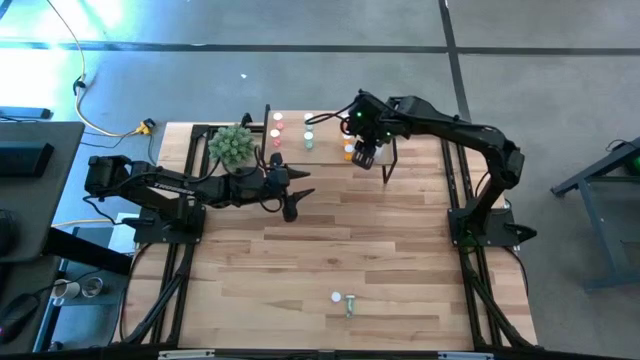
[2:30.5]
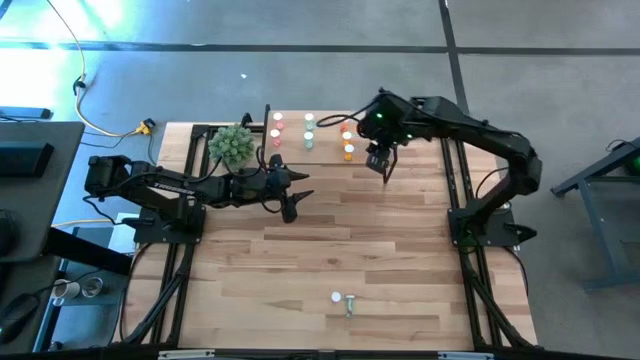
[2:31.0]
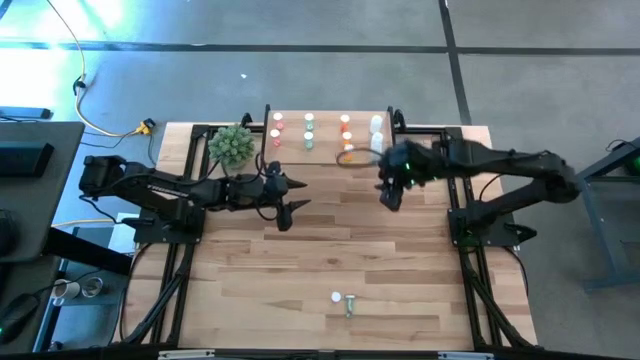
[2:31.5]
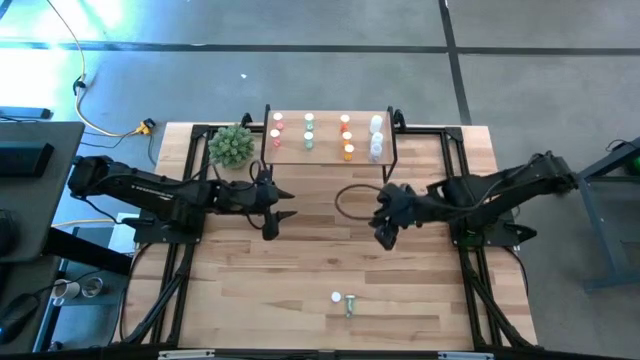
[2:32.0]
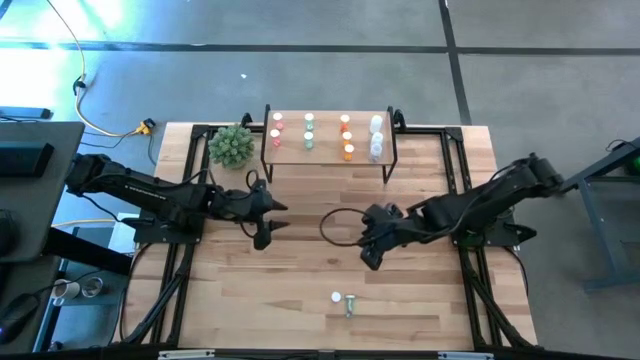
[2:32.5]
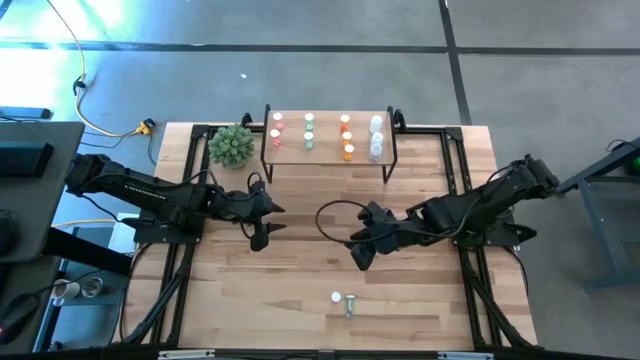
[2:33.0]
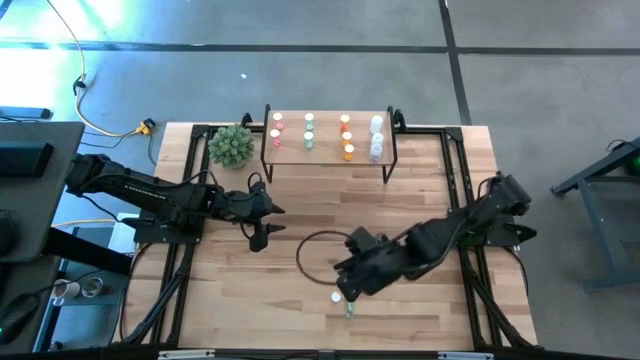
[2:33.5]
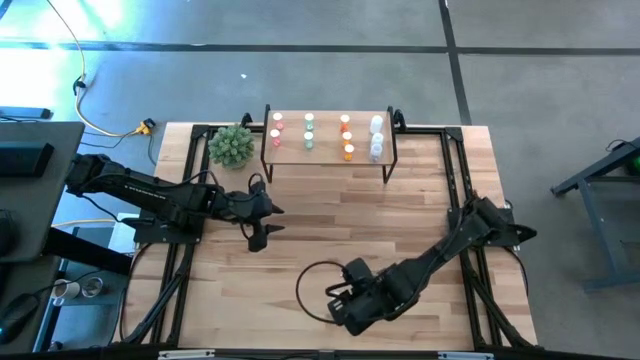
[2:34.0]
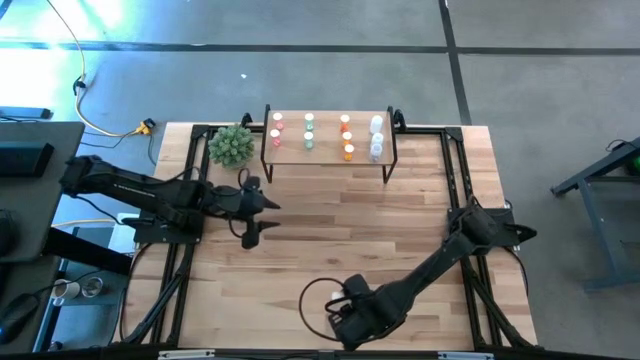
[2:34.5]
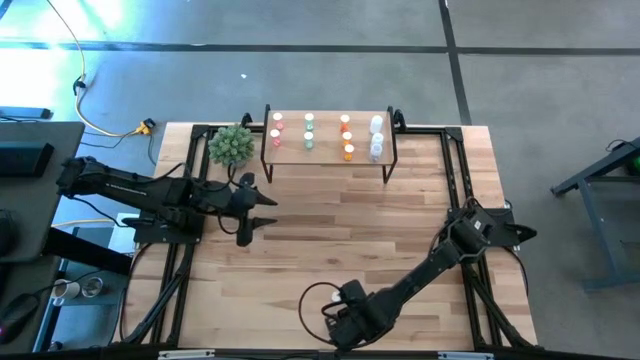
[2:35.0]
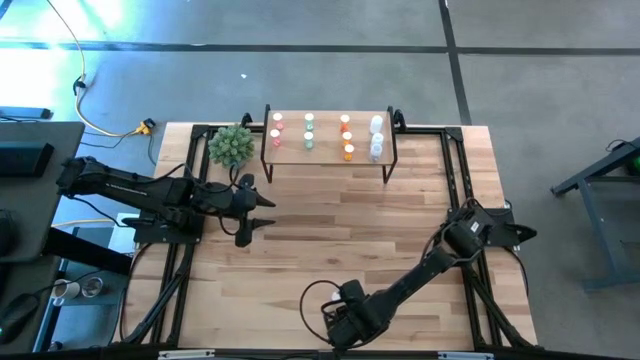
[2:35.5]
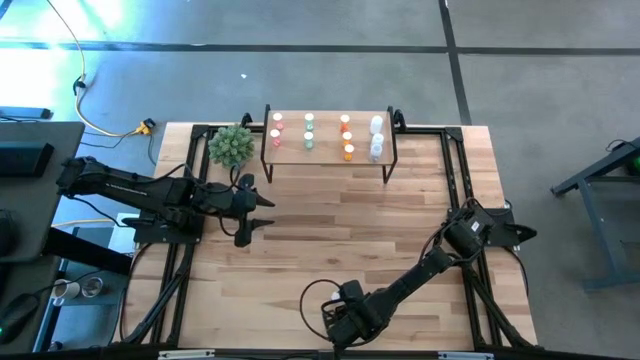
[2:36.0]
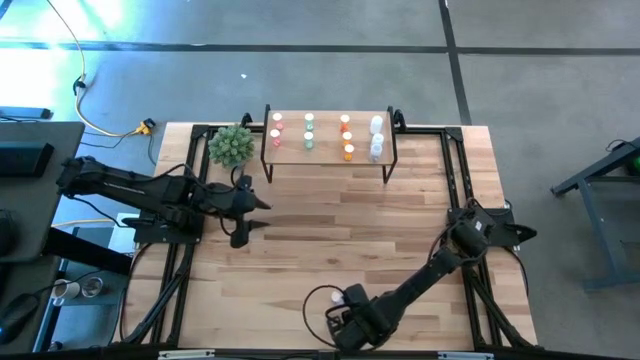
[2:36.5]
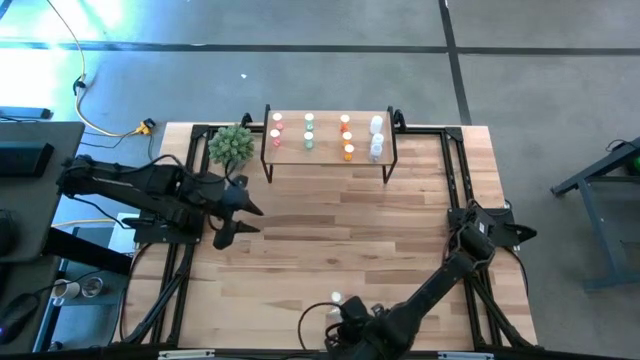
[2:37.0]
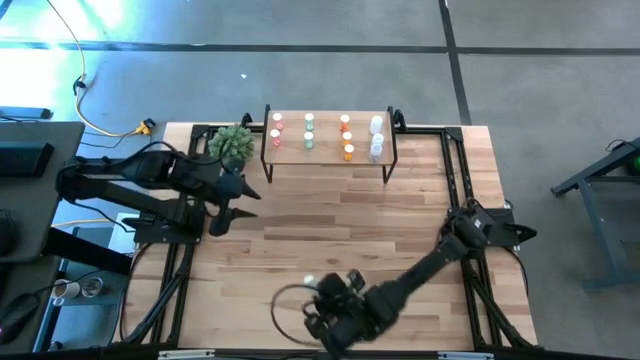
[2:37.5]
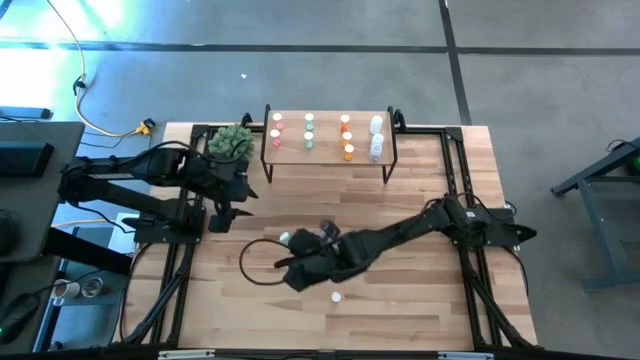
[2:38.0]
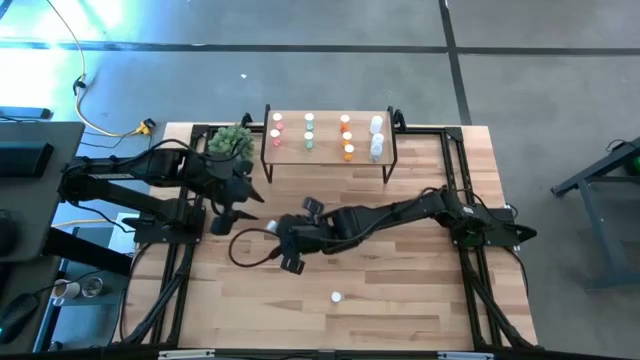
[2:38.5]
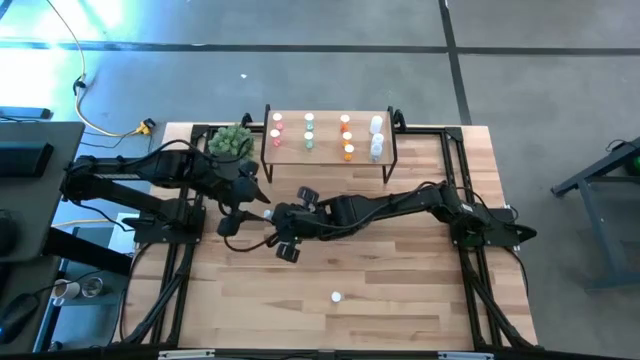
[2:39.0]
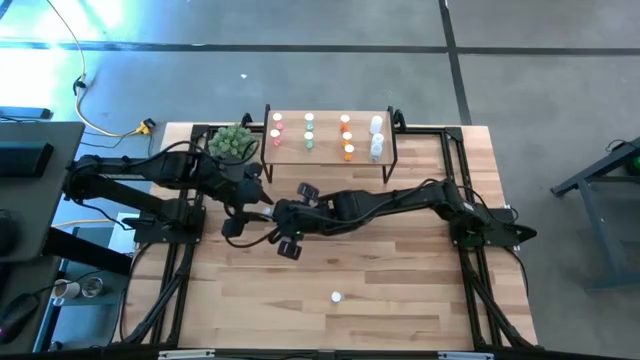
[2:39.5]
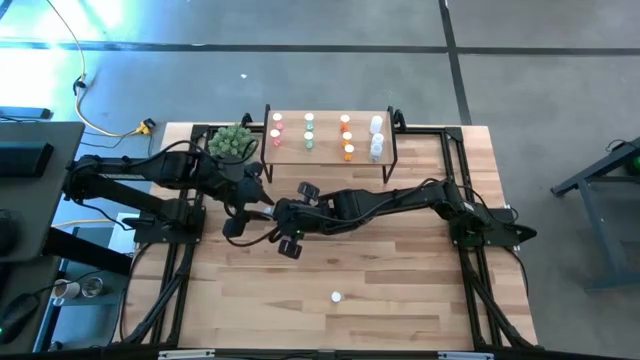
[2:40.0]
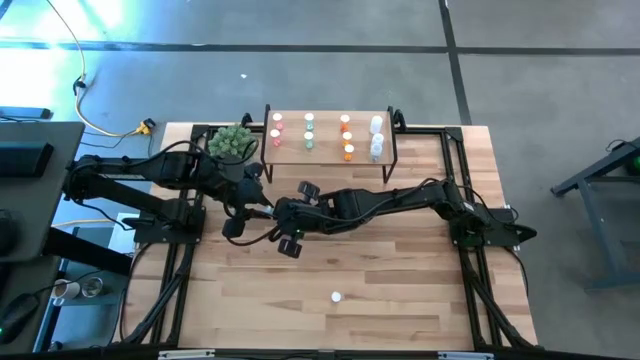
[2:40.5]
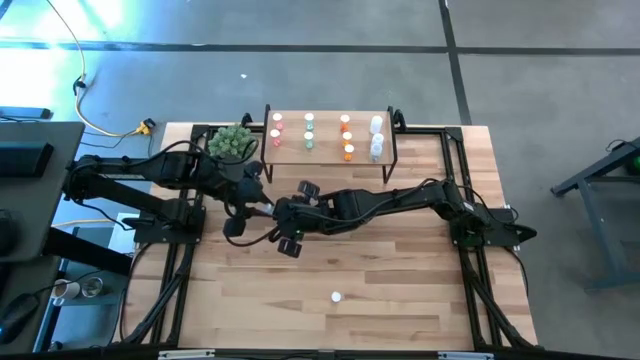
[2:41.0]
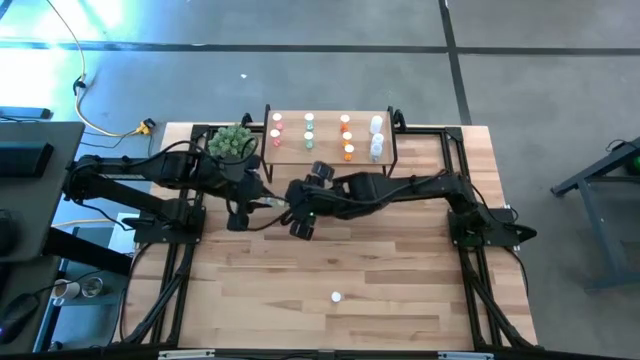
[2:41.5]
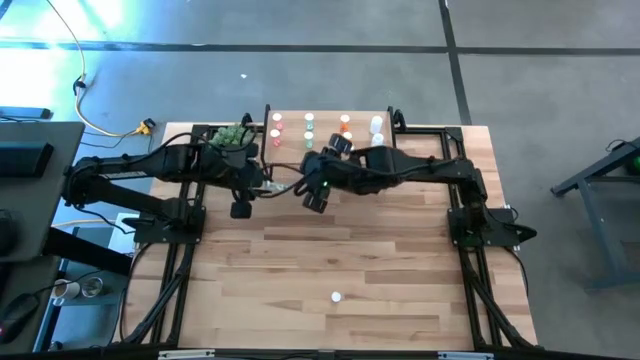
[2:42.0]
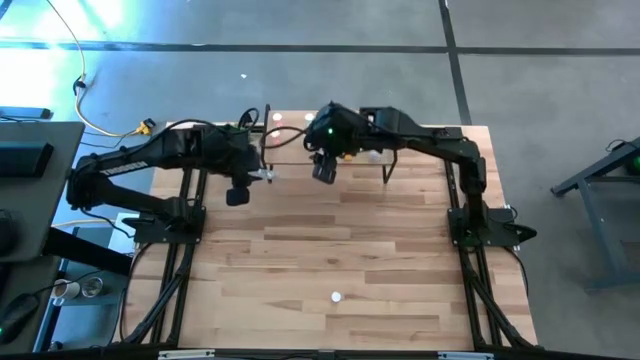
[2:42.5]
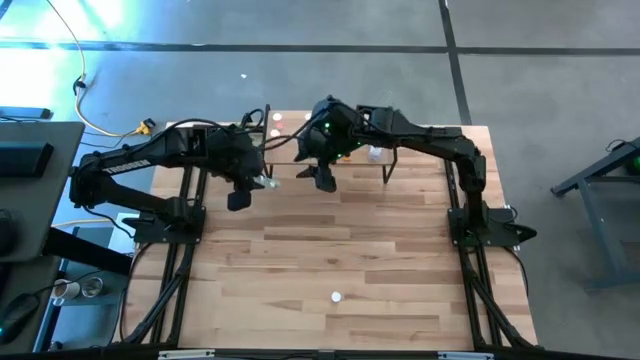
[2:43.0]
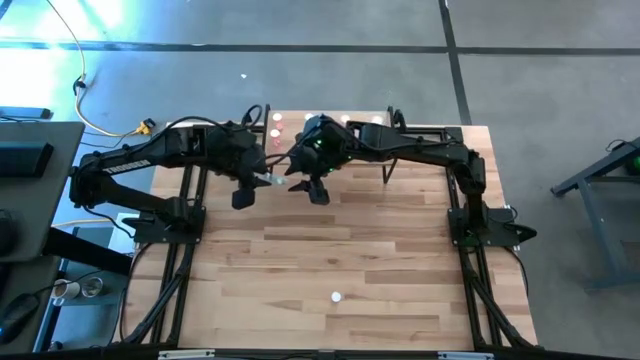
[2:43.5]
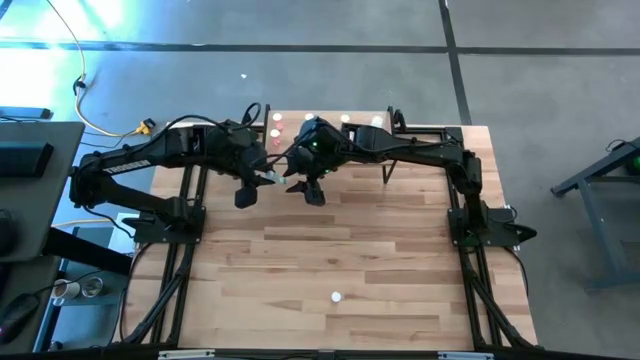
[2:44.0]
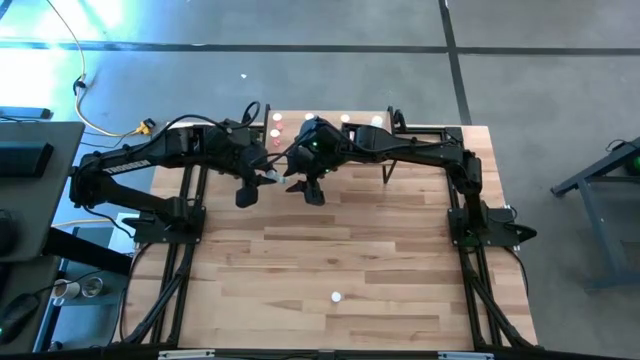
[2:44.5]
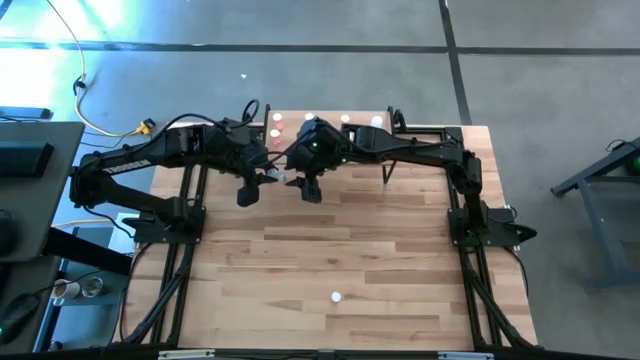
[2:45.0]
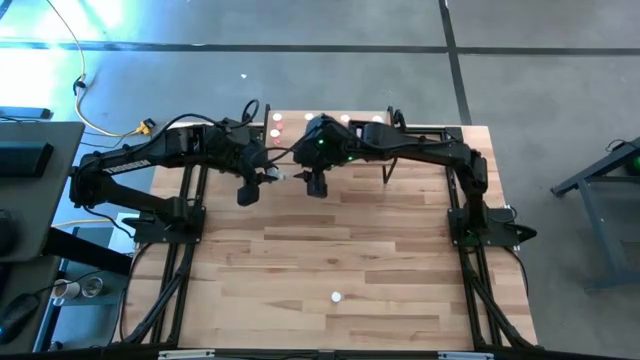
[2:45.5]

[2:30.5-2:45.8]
Task: Pick and place medicine bottles onto shelf by color
Put the blue pill bottle on the shelf aligned with the other blue pill bottles

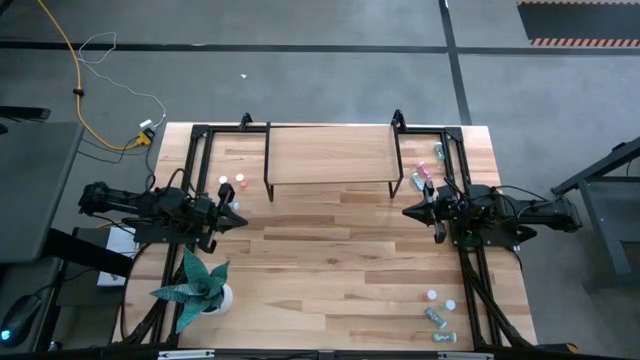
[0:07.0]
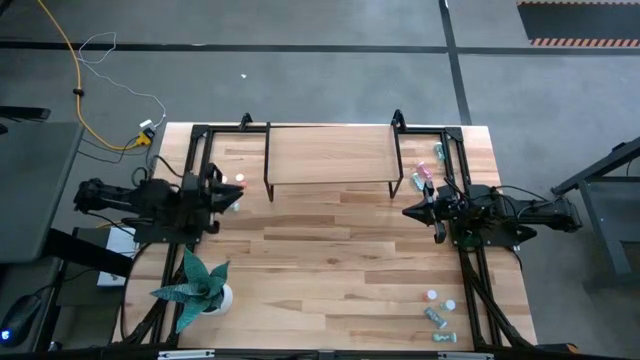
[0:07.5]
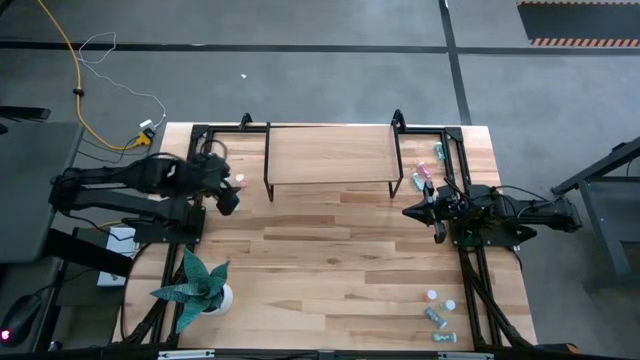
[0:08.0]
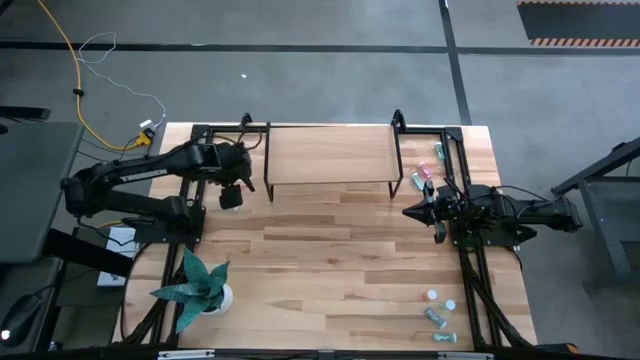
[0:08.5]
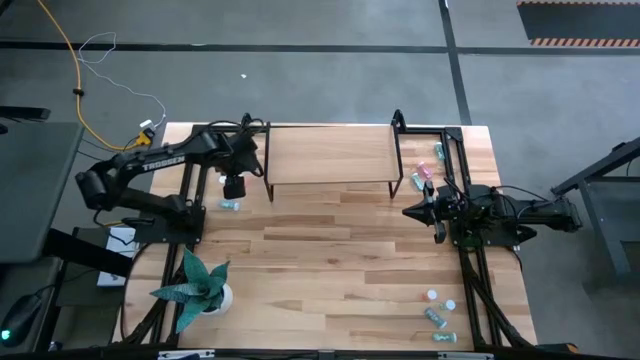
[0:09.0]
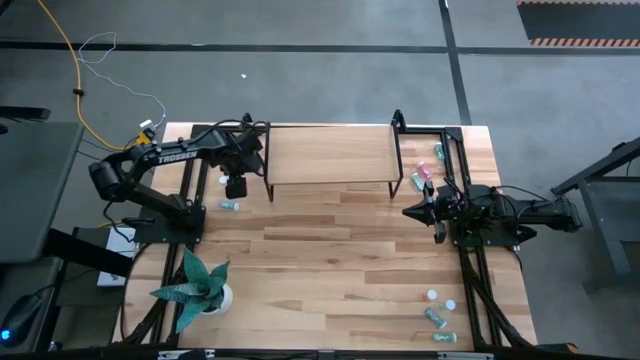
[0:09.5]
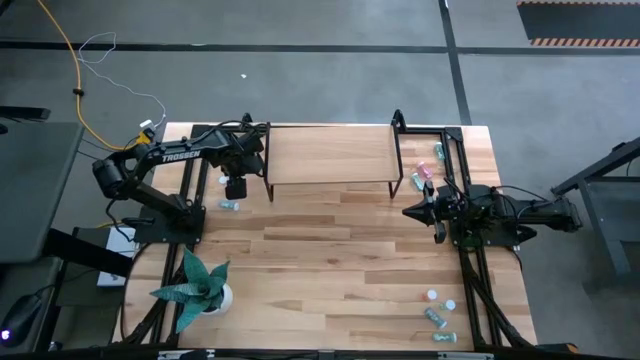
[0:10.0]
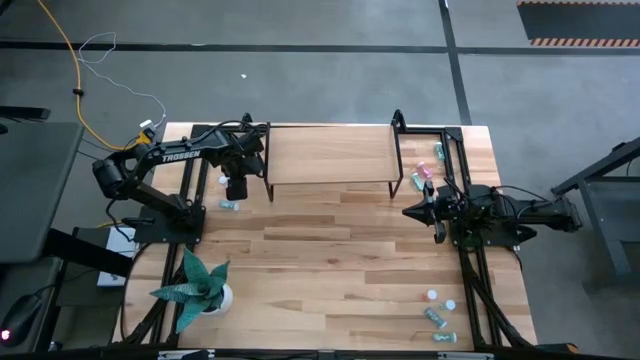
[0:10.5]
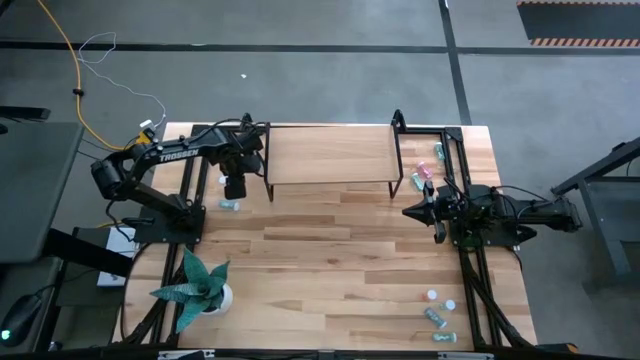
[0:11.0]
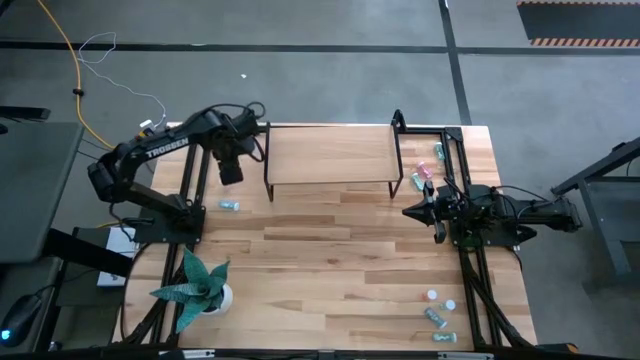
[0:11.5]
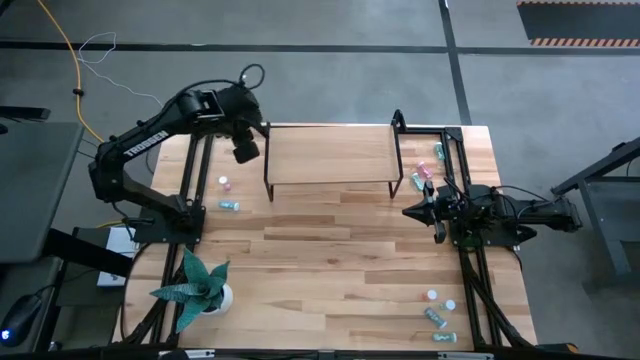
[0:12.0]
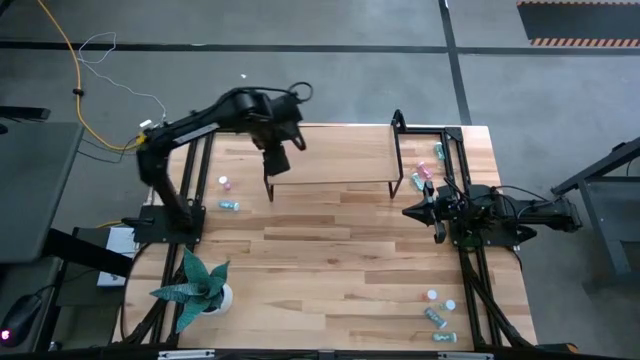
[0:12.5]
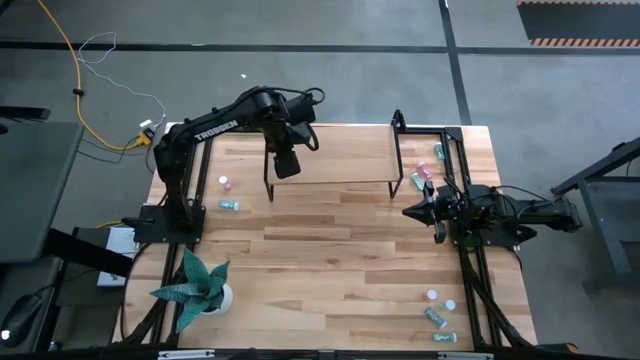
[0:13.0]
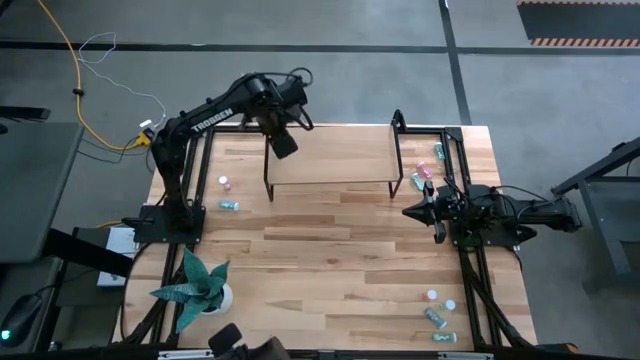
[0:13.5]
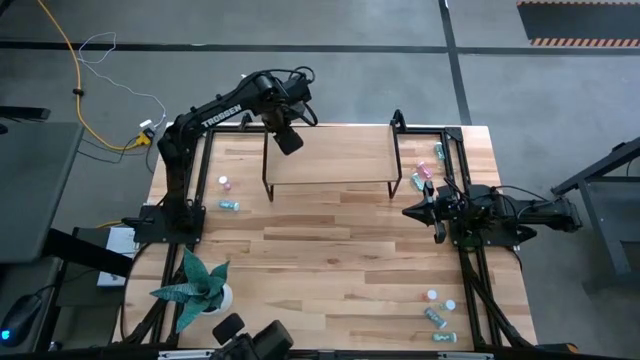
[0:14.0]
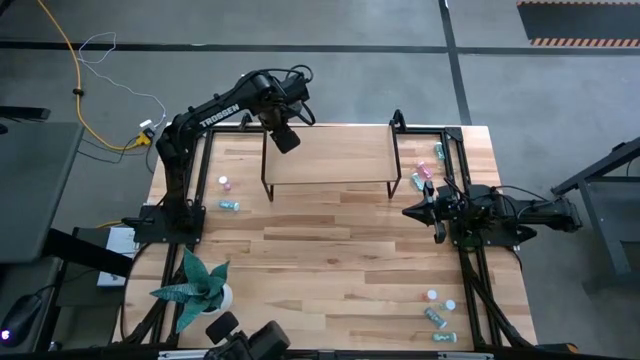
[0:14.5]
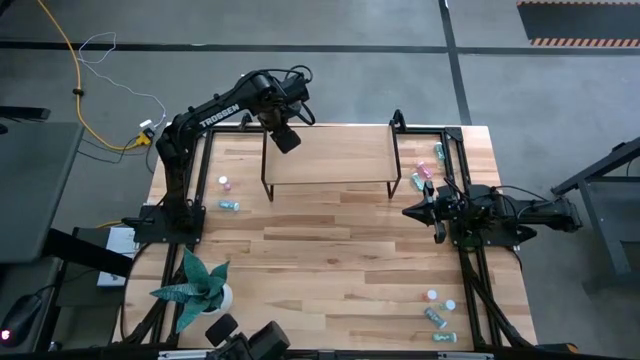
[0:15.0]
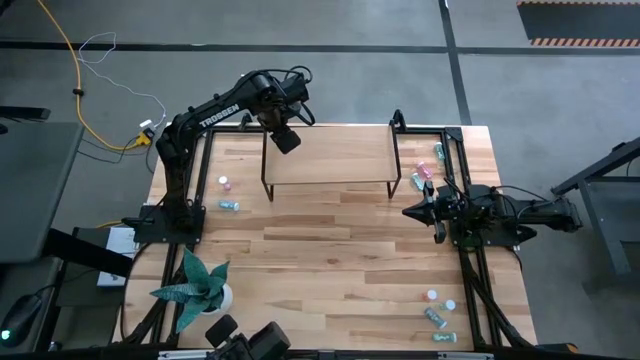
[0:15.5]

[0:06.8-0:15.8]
Task: Pick and place medicine bottles onto shelf by color
Put the red pill bottle on the shelf
